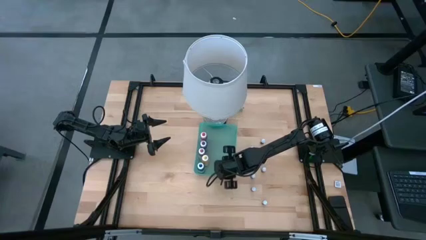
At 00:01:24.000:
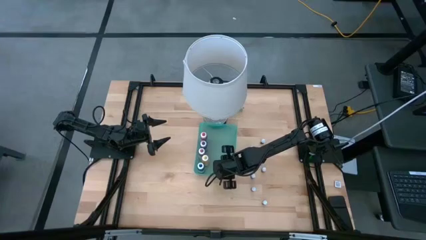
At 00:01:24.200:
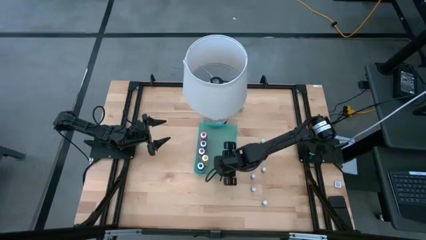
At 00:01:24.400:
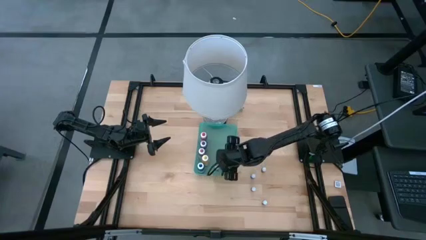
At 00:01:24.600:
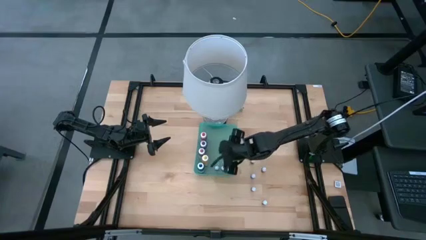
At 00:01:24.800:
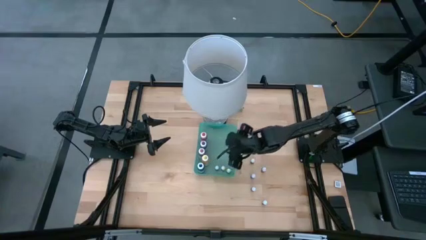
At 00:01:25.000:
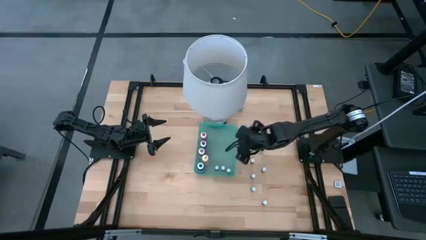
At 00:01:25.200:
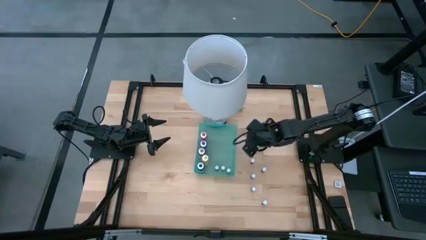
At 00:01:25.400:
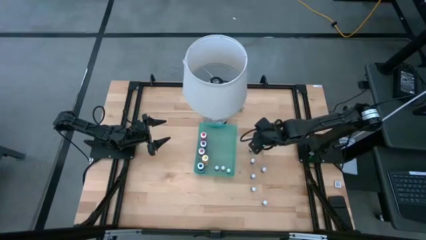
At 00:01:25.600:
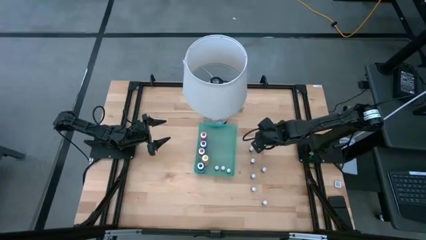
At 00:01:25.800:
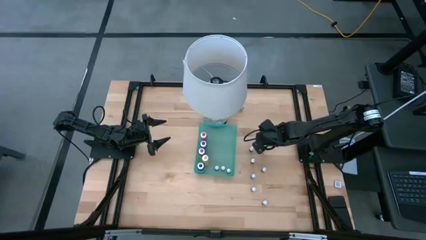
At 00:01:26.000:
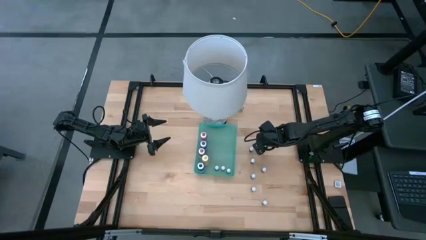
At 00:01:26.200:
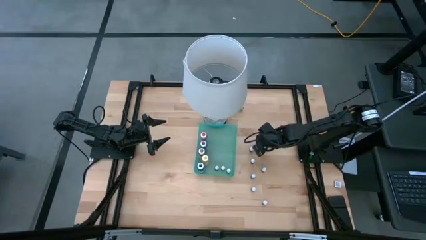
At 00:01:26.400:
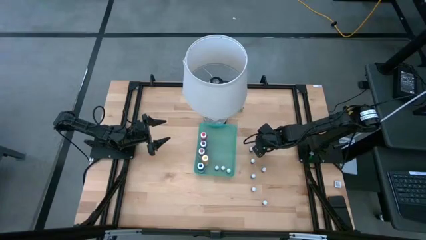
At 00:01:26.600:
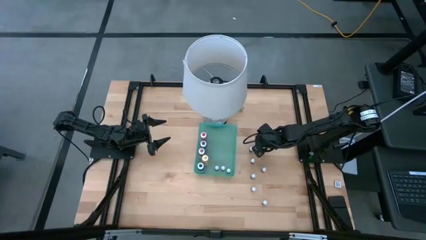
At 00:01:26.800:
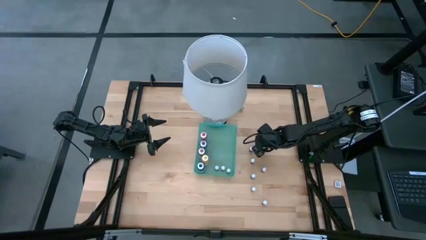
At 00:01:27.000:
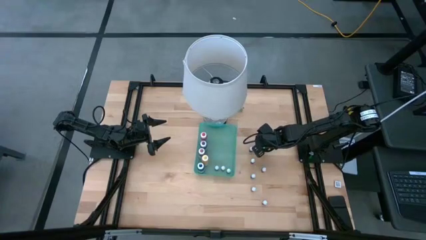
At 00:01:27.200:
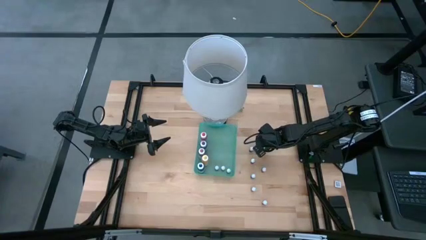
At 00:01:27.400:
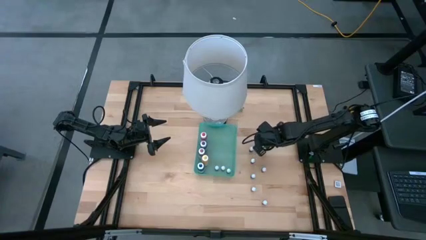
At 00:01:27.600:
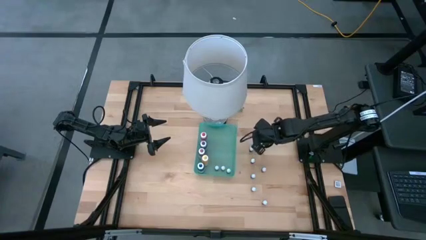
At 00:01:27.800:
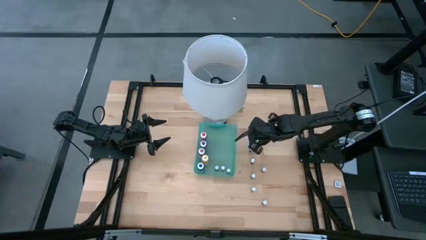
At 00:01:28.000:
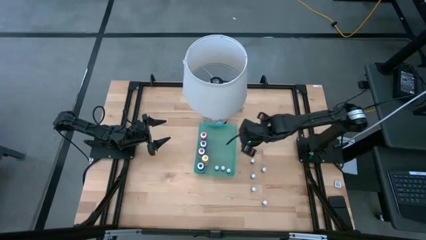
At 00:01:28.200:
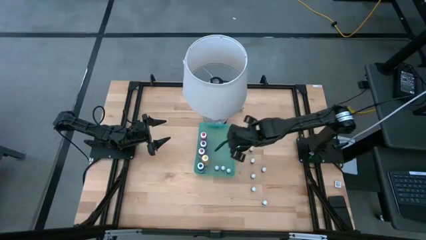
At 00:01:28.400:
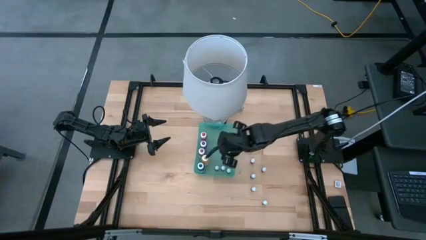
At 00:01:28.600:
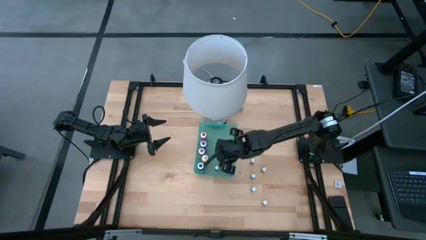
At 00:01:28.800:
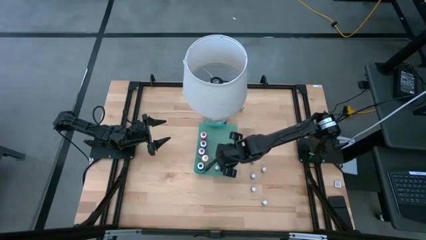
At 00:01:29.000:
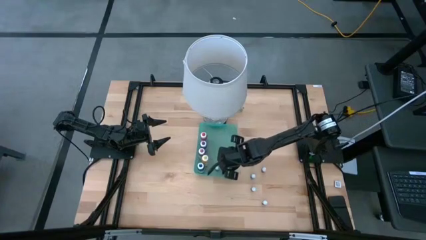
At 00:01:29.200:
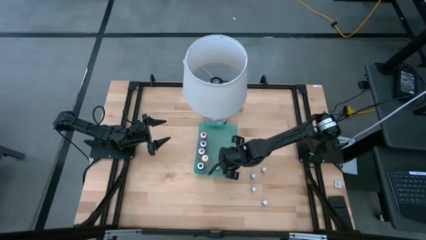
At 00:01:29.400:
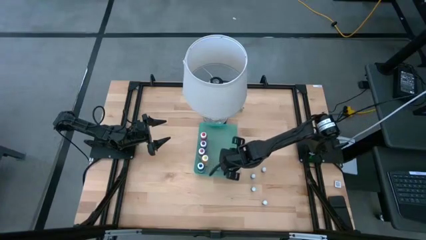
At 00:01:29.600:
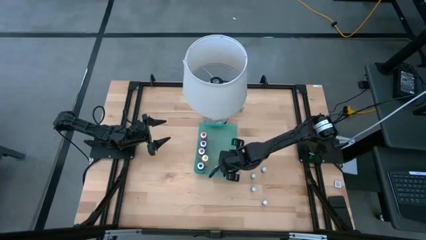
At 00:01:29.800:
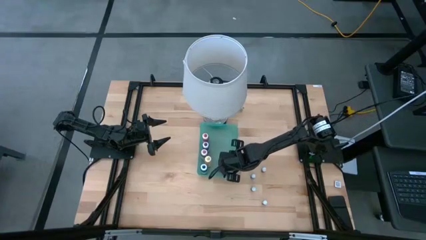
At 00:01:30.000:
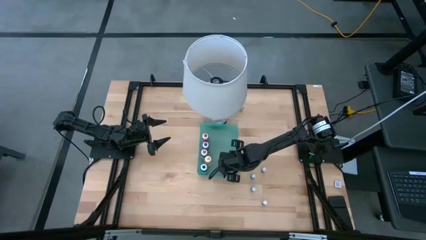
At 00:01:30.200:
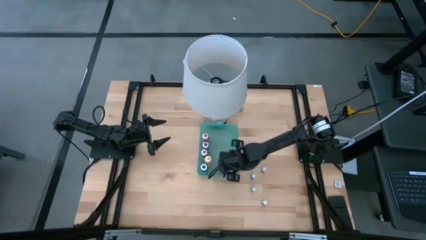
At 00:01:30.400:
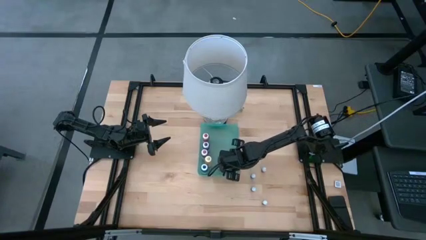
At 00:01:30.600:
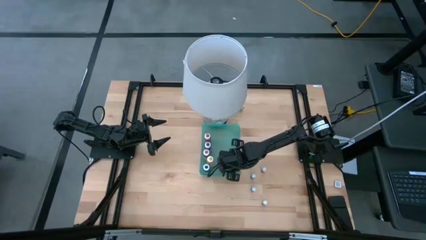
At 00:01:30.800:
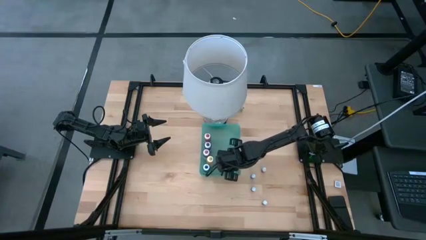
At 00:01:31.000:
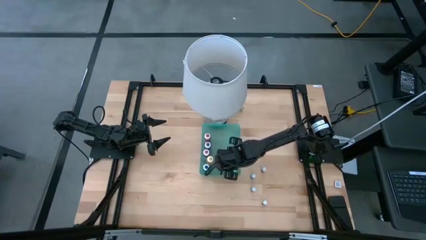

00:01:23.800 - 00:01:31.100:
Task: Pick & Place food coloring
Put the small black food coloring bottle into the green bin

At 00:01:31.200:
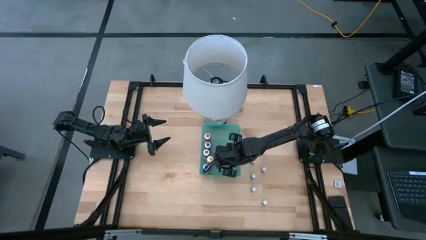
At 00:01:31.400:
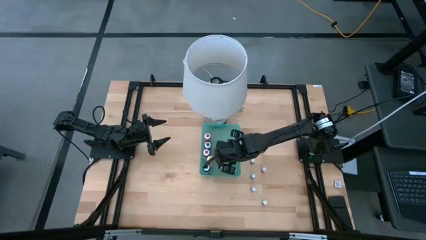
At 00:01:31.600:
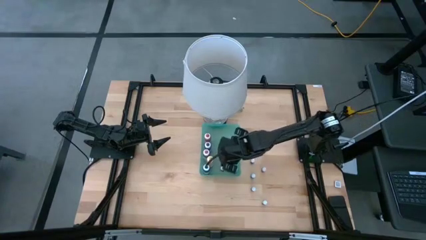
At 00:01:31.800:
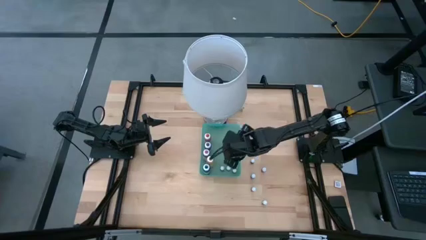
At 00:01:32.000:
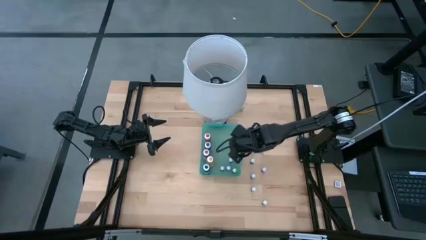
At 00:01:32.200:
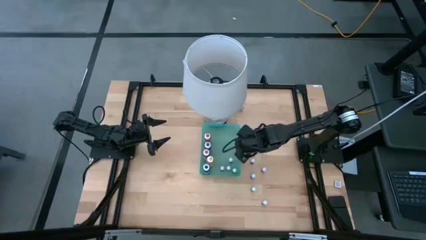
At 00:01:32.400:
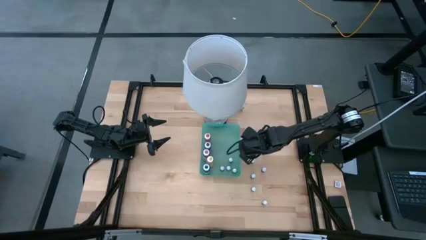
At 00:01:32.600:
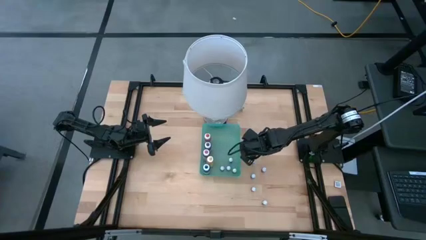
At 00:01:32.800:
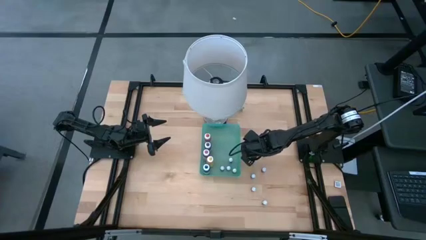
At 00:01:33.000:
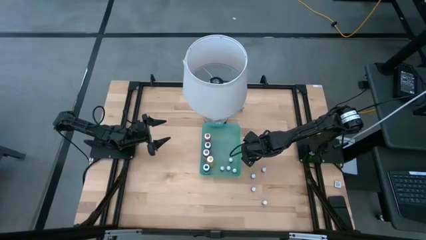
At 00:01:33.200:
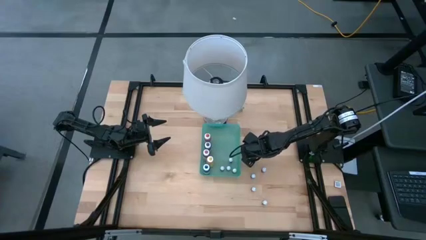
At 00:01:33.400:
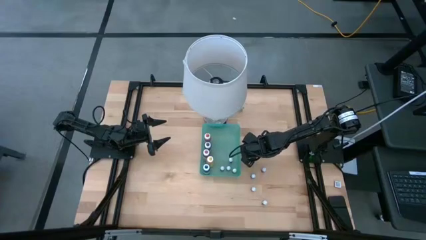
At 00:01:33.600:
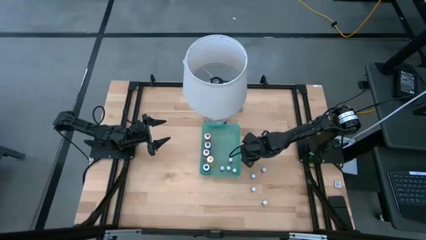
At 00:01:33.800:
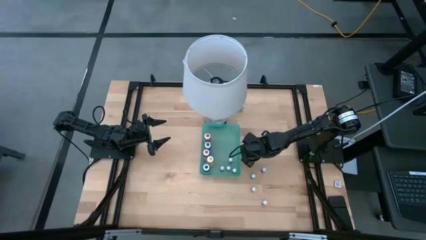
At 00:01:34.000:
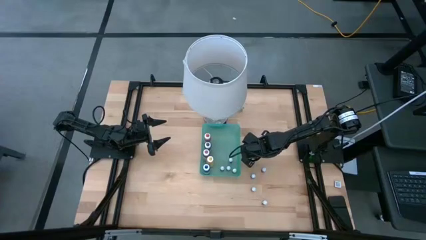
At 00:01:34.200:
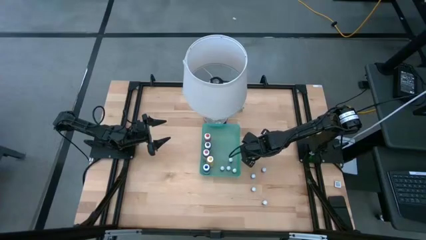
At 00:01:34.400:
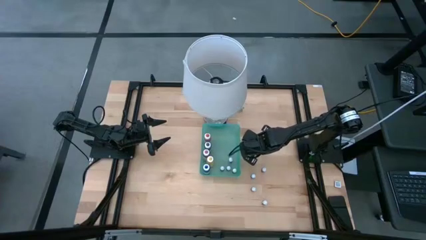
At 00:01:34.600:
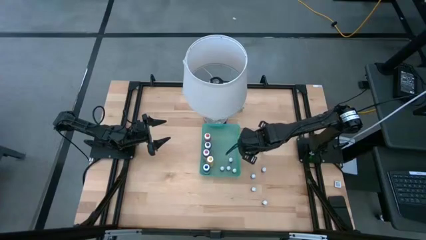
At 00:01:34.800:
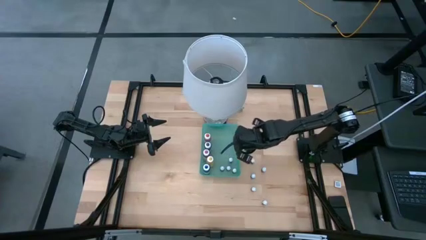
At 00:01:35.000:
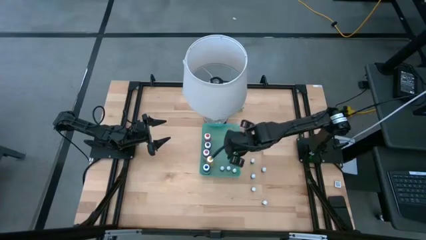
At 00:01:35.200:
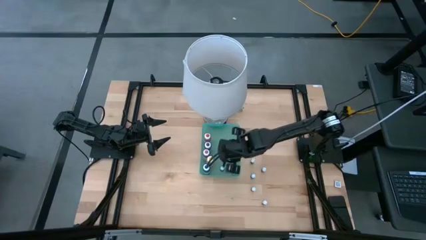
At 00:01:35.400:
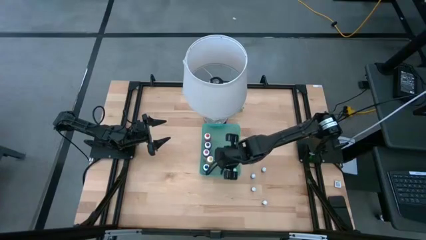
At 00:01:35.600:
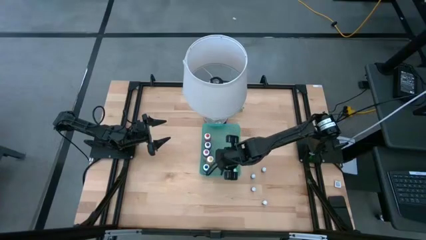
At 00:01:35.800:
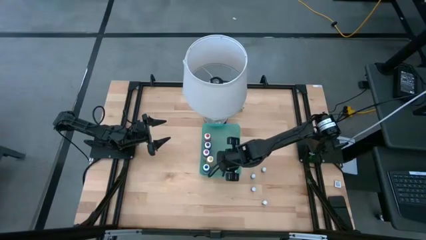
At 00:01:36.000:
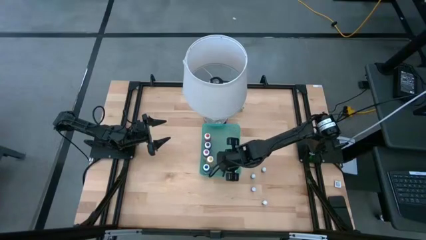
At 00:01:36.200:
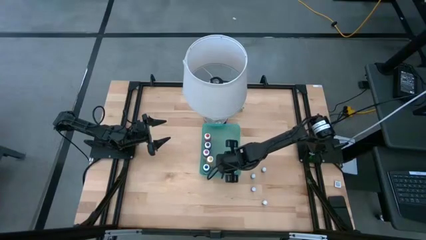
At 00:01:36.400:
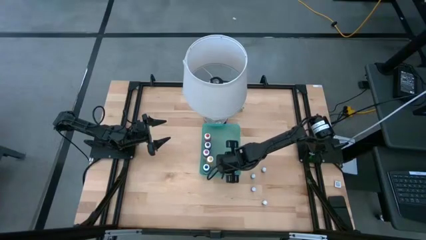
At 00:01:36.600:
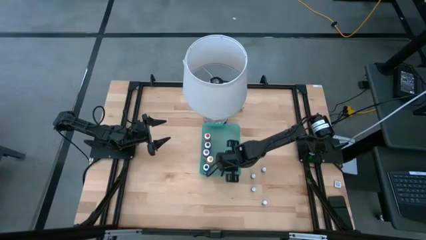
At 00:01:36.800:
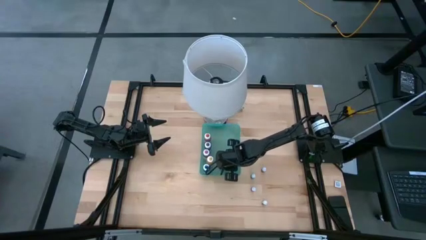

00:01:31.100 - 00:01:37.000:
Put the small black food coloring bottle into the green bin

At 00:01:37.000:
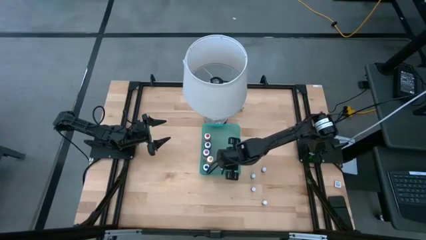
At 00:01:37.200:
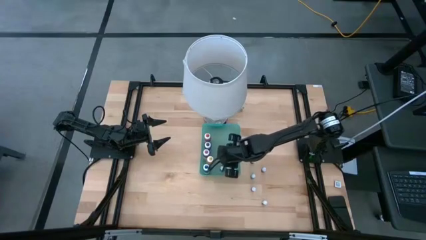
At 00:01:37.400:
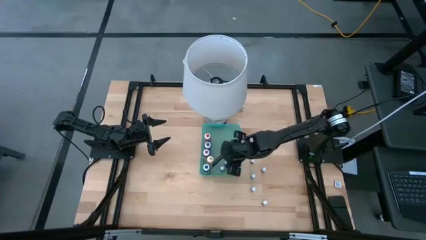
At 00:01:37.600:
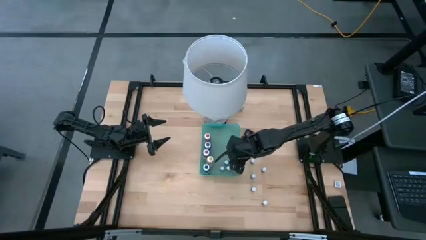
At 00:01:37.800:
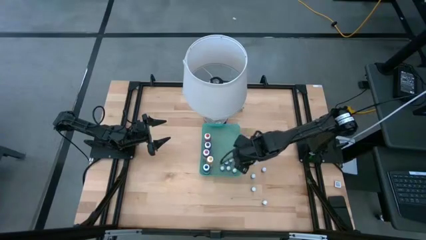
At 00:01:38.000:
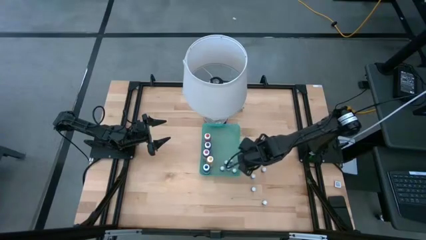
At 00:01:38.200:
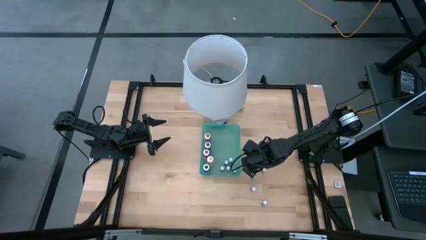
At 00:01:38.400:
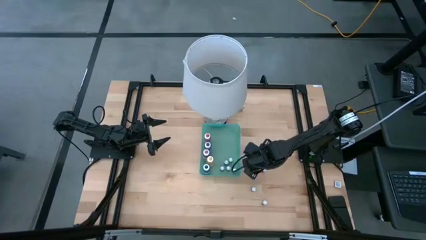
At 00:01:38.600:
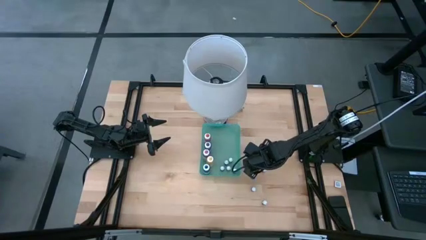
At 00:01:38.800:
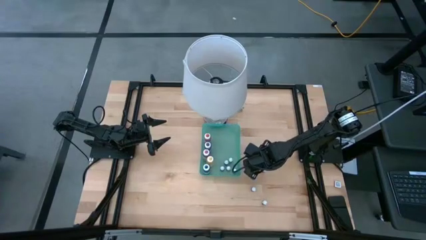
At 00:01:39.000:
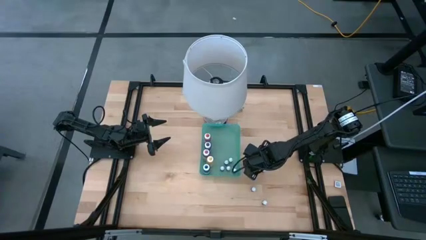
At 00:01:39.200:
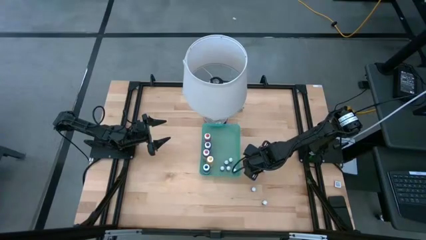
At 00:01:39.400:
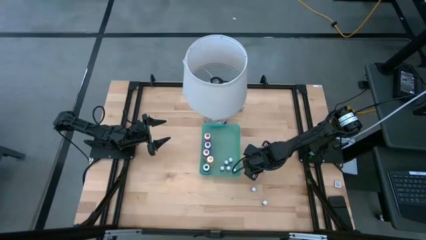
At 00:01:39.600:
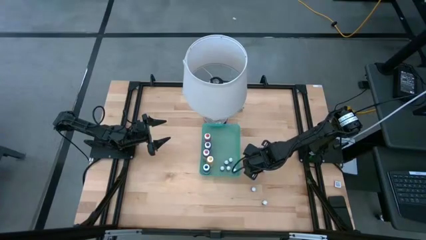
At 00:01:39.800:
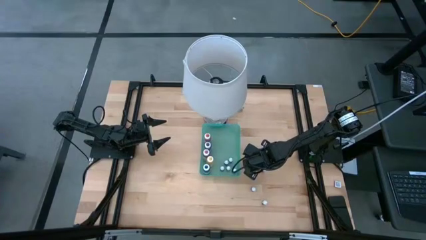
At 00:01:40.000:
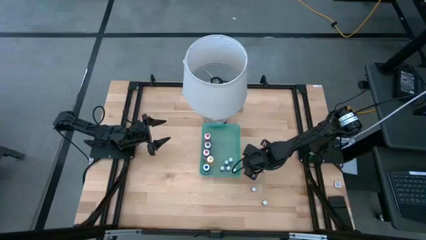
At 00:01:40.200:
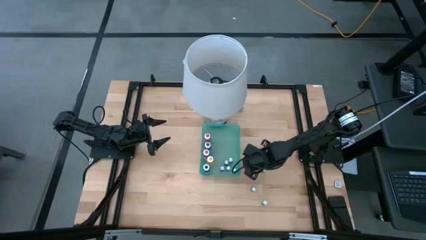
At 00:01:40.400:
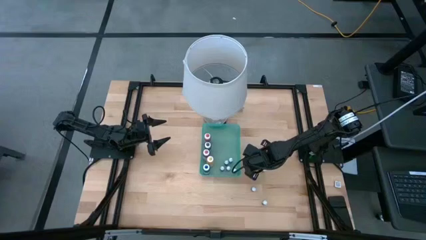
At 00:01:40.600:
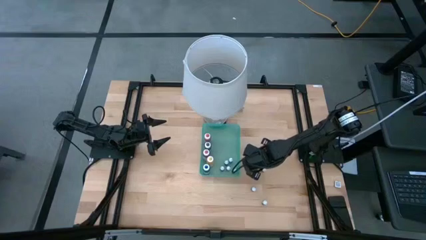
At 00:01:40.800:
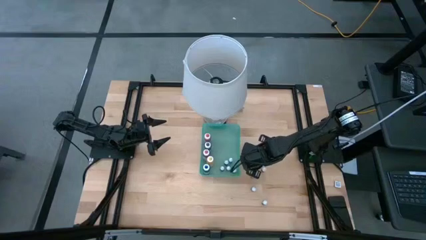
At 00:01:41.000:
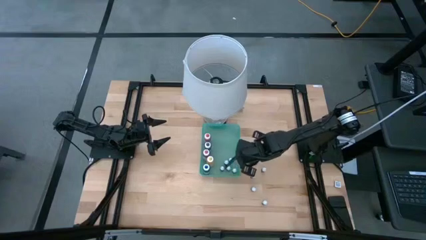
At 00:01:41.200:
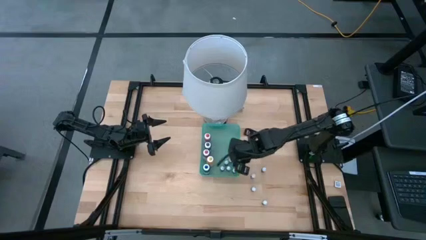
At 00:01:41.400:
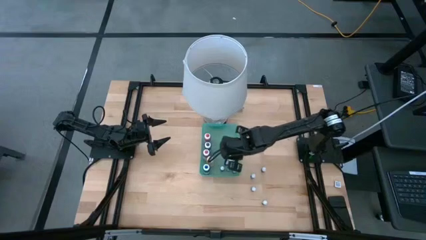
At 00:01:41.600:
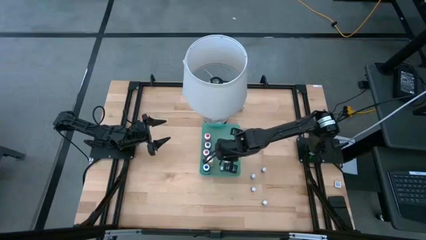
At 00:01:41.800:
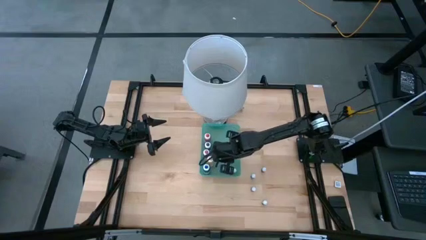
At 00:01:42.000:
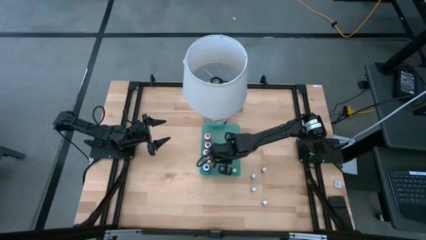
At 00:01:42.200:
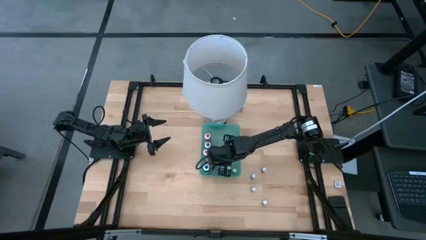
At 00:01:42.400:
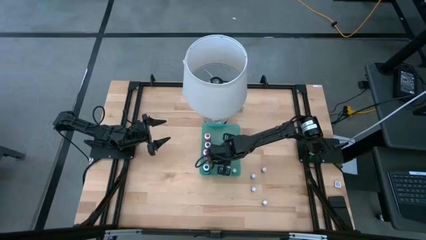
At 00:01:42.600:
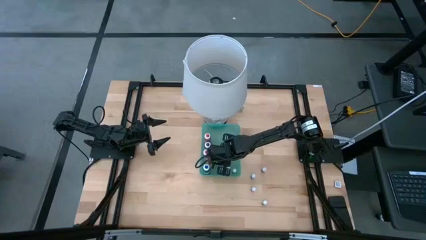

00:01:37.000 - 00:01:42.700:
Put the small black food coloring bottle into the green bin
